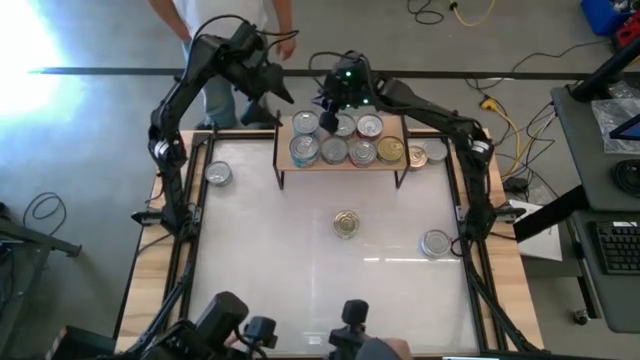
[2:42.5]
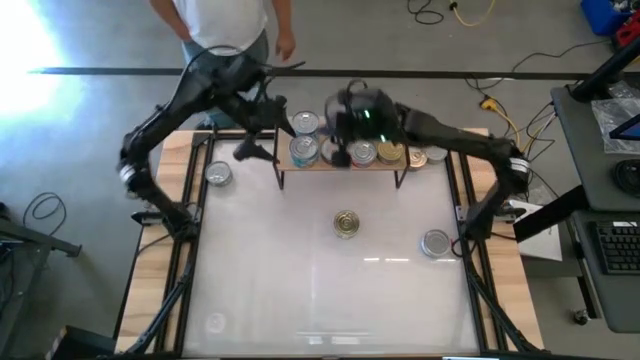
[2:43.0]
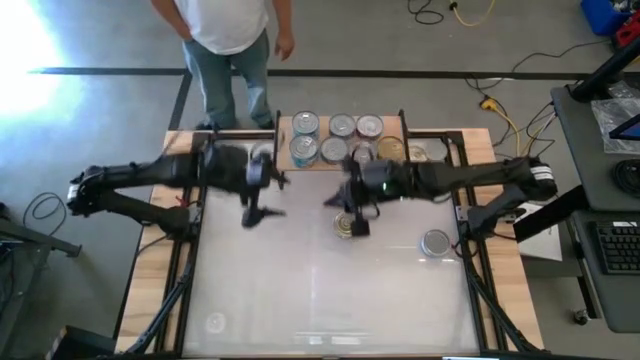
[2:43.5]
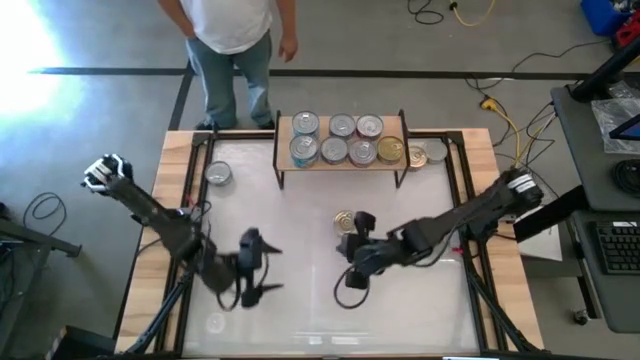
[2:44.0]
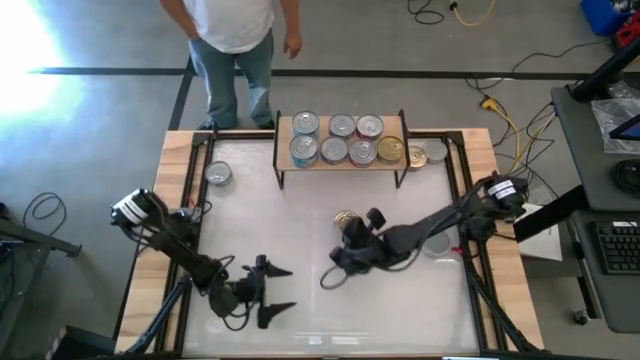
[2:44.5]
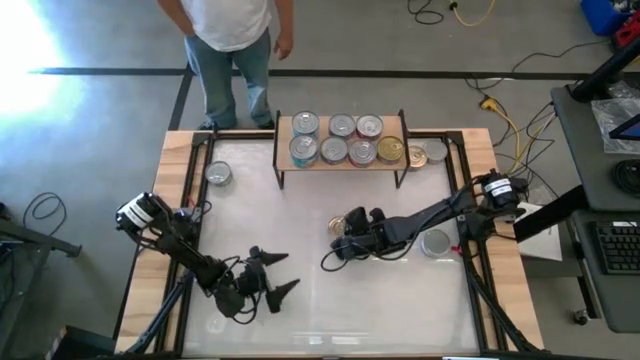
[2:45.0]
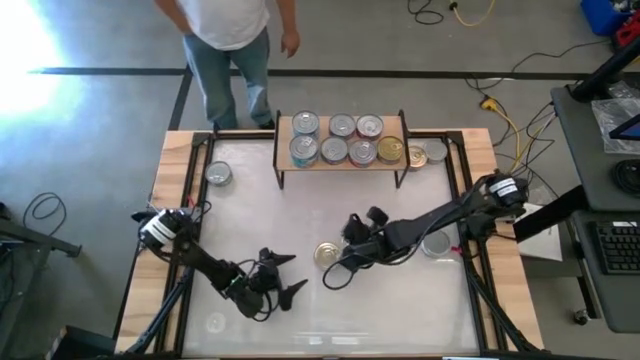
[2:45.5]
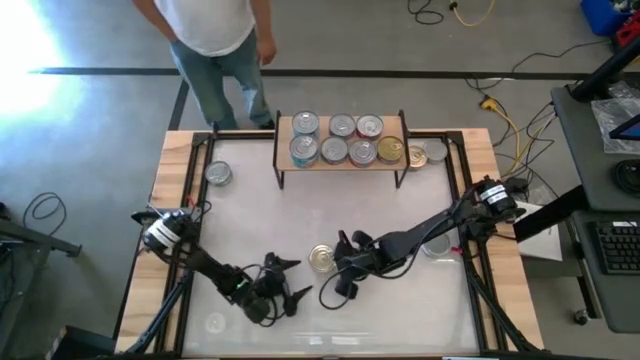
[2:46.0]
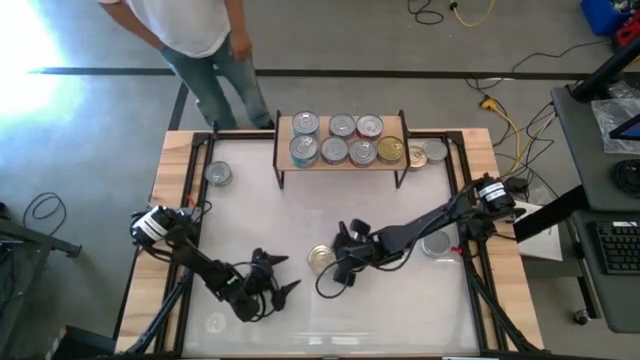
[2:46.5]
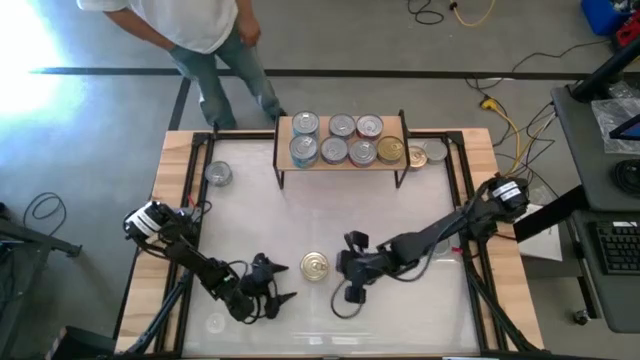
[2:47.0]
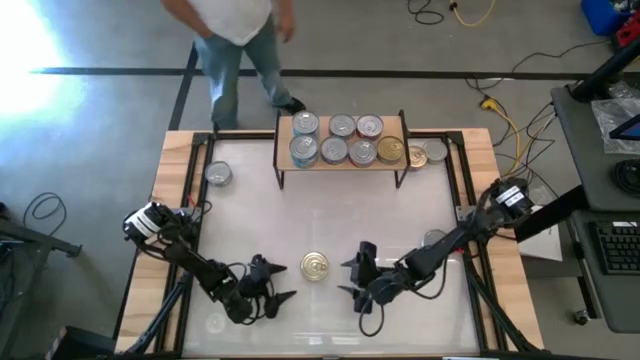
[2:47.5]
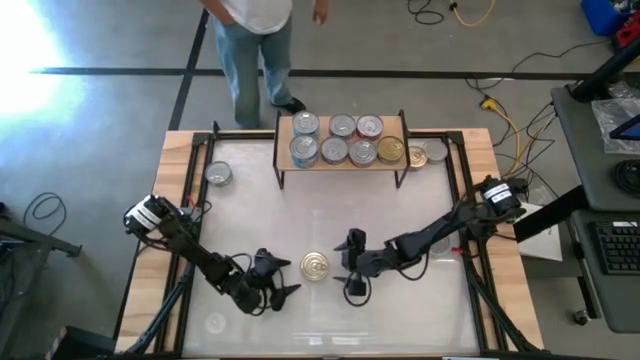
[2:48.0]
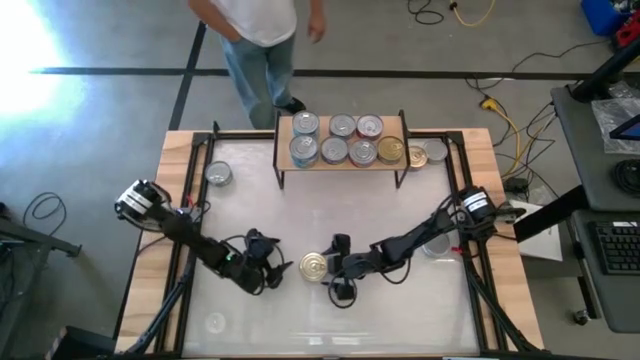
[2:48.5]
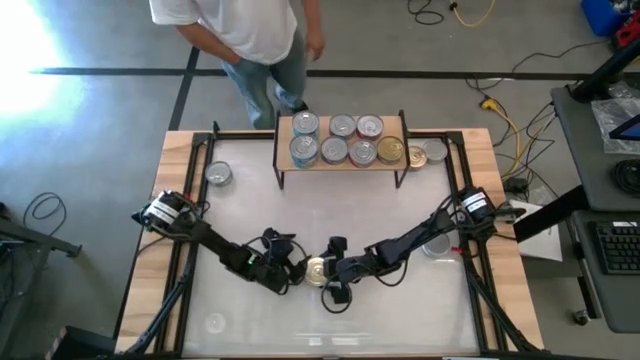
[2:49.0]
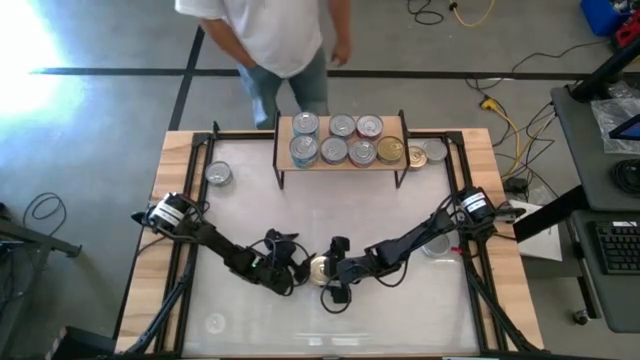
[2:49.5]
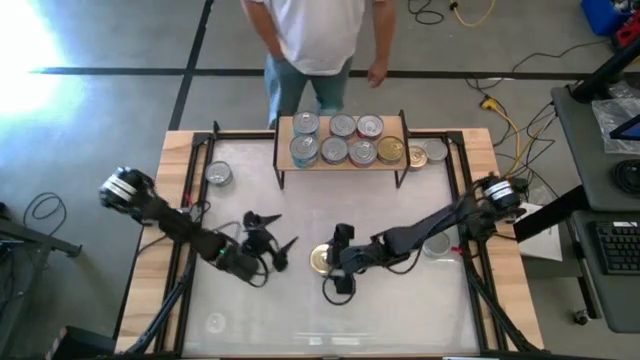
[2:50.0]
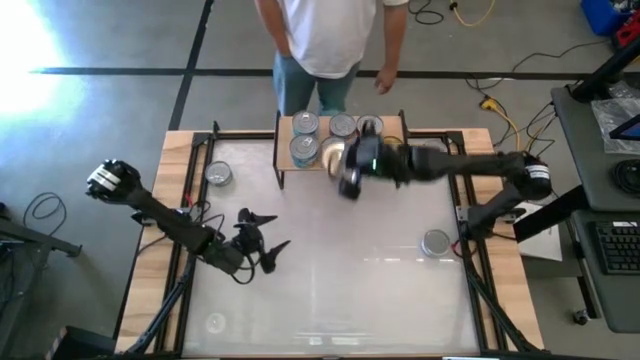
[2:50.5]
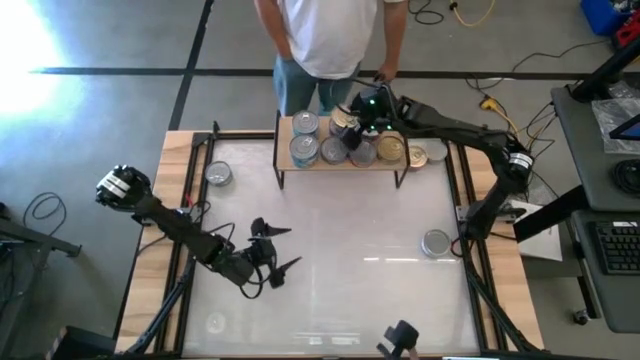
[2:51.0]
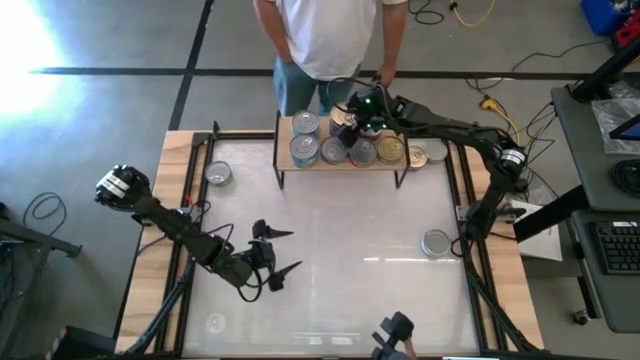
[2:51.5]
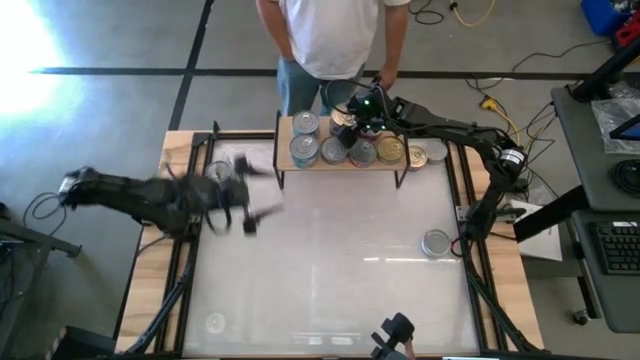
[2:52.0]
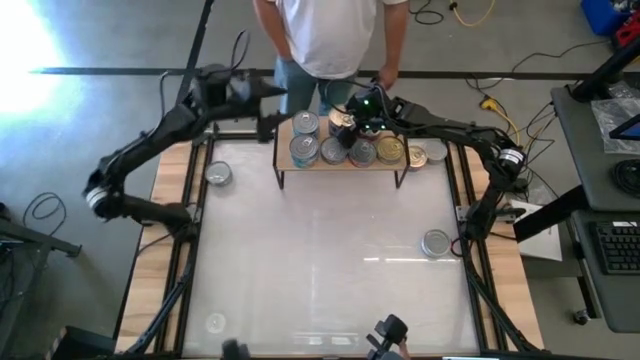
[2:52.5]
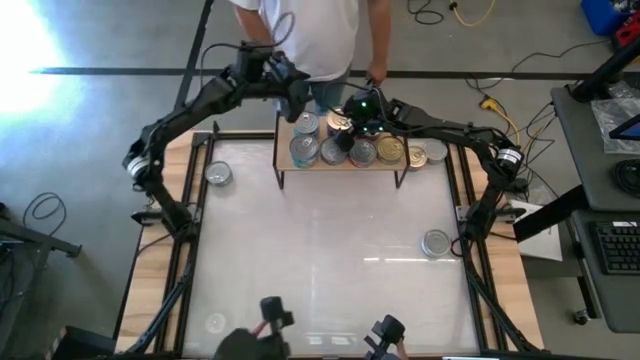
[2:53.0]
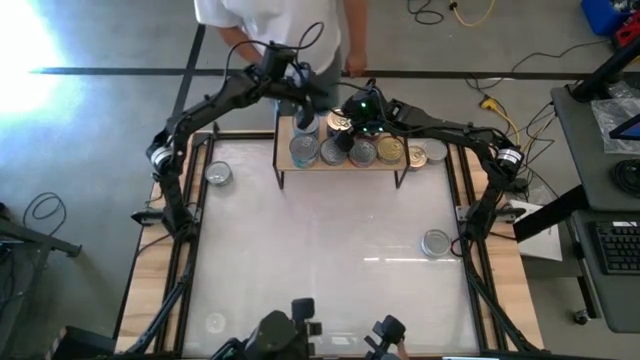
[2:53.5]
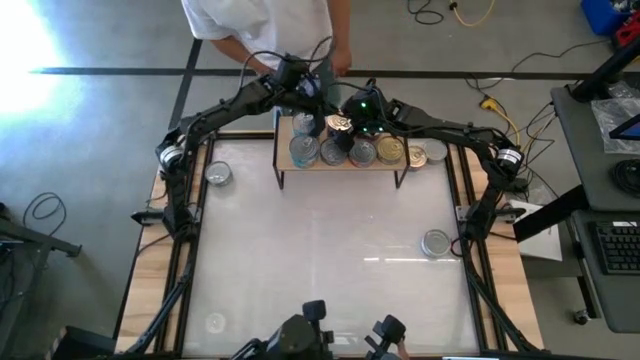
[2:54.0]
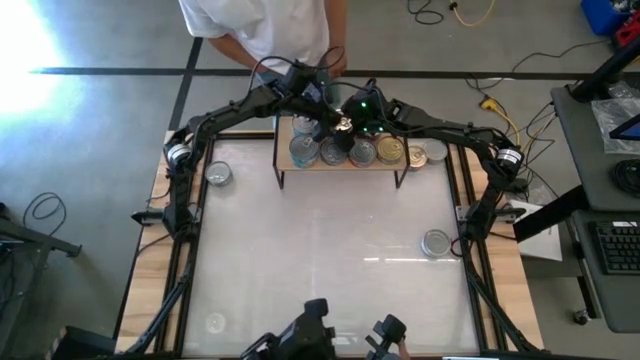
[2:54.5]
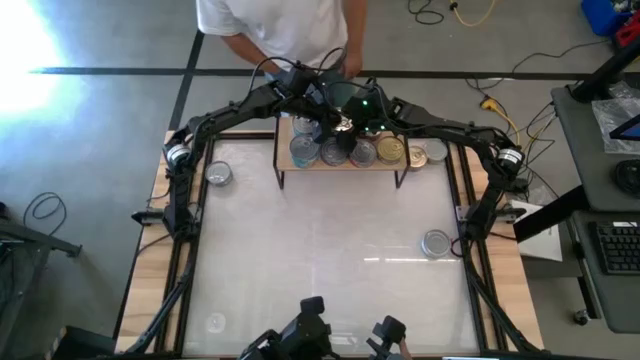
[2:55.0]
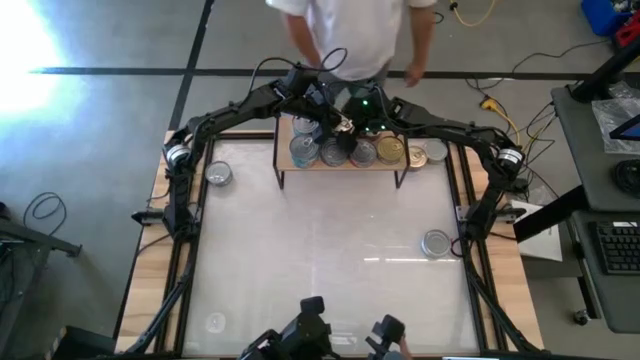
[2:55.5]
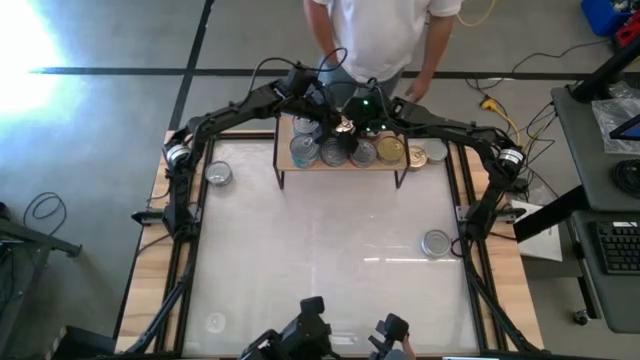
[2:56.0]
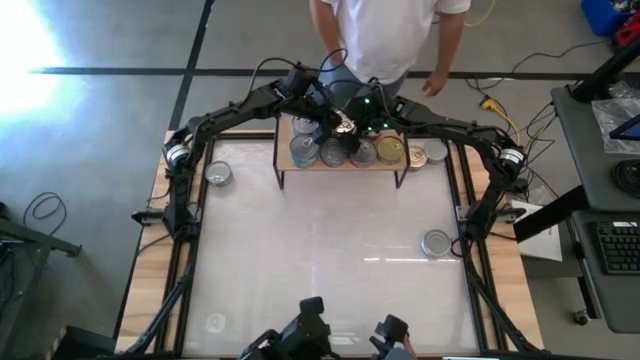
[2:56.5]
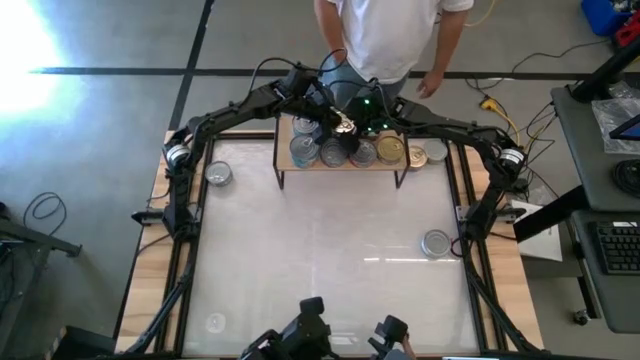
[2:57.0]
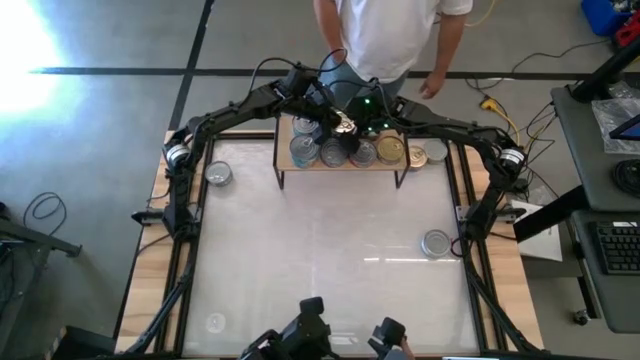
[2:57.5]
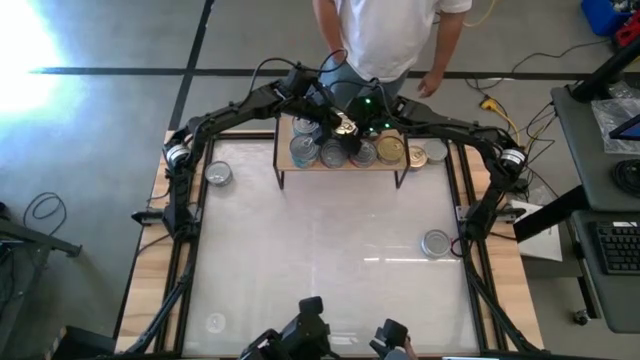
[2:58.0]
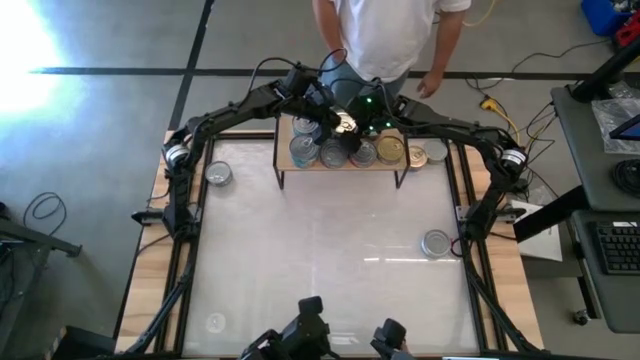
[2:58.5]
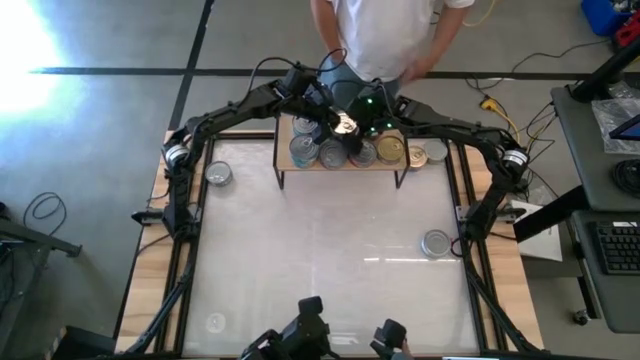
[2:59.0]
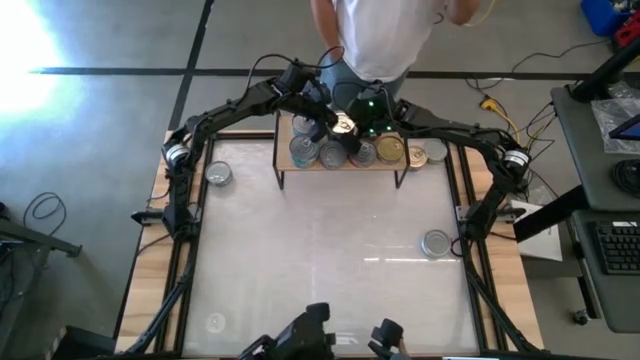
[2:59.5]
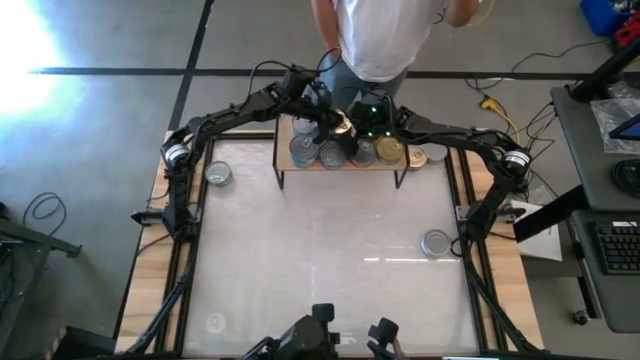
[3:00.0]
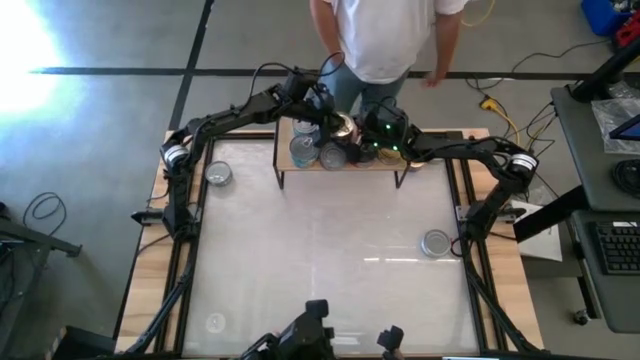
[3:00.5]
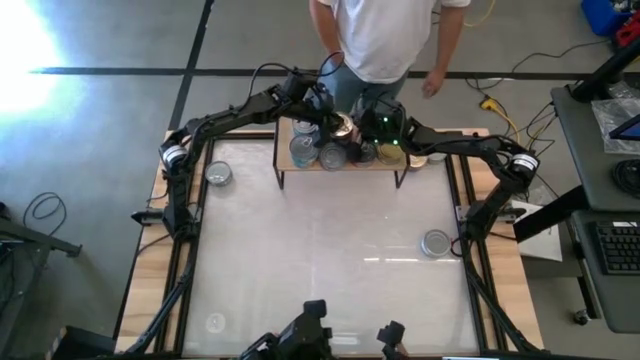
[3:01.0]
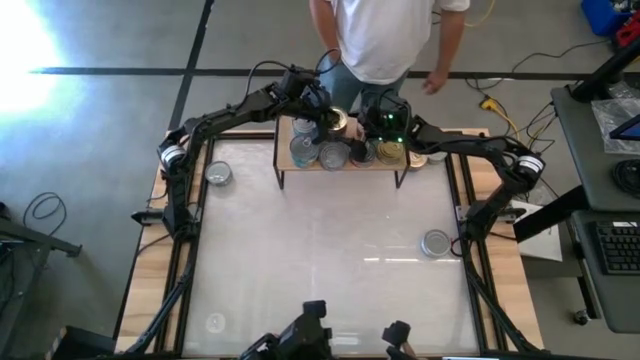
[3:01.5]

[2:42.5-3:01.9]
Task: Stack canned seafood by type on shelf
Stack the middle blue-pink tuna can on top of the blue tuna can on the shelf

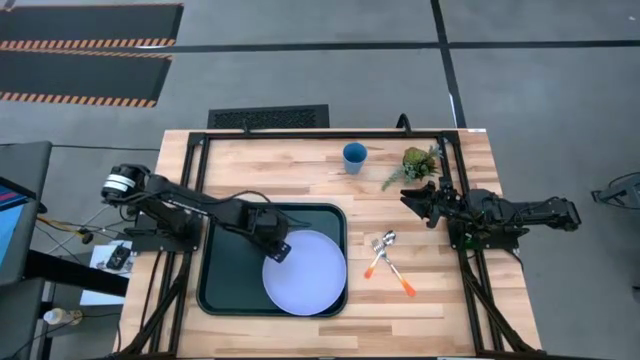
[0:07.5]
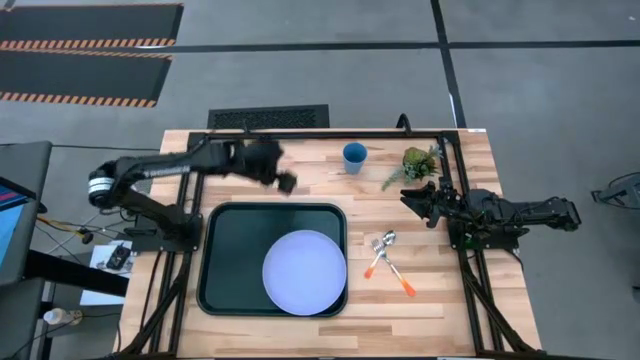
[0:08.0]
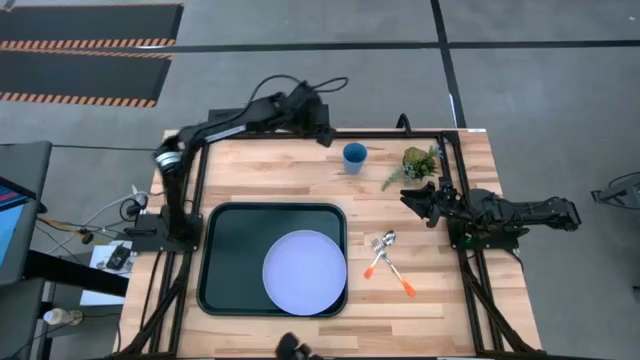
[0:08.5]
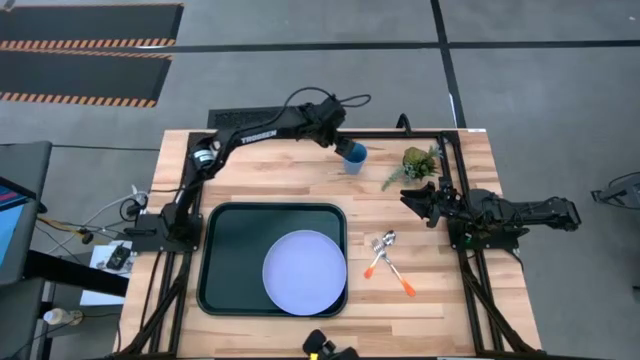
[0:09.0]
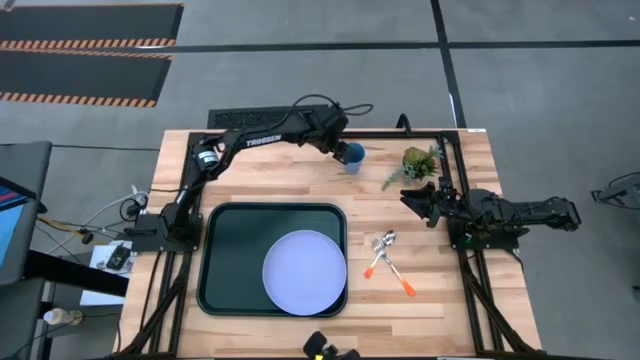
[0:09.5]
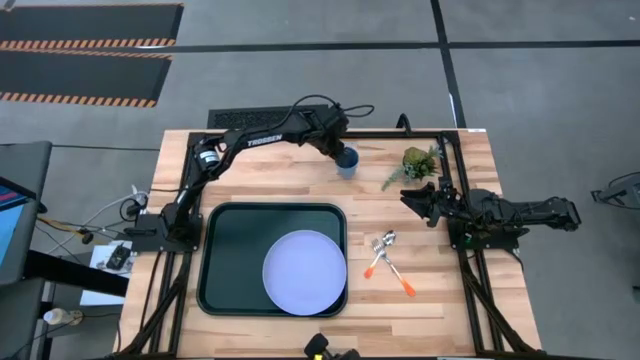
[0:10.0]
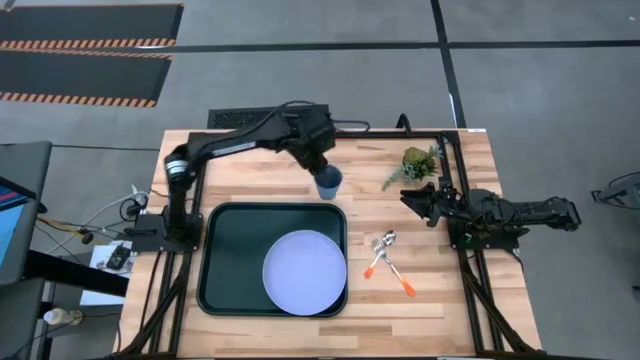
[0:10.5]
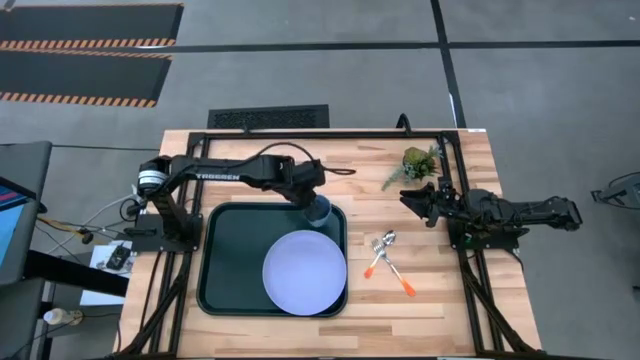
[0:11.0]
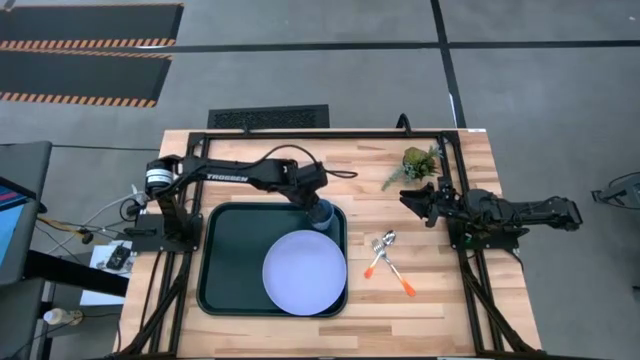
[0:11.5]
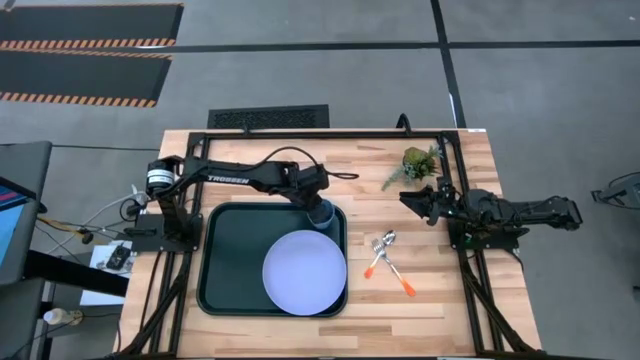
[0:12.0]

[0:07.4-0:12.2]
Task: Pick and place plate/cup/fork/spoon on tray
Put the blue cup on the tray to the top right of the purple plate
